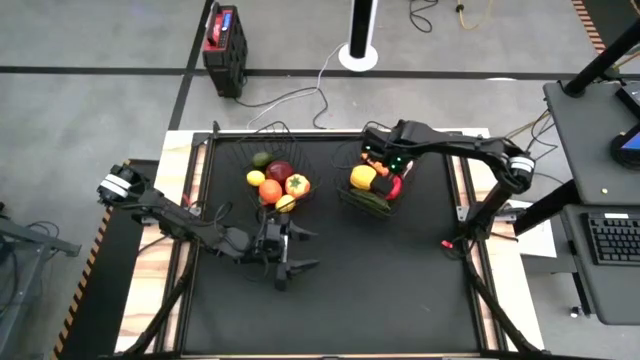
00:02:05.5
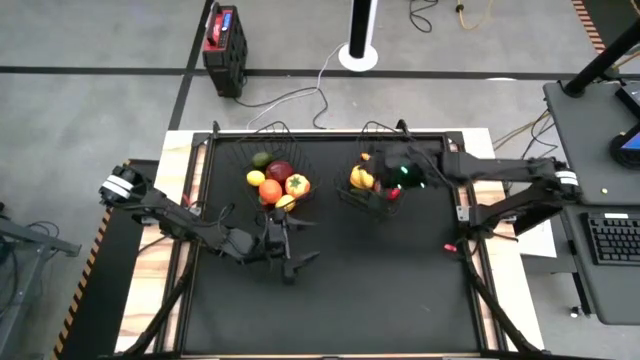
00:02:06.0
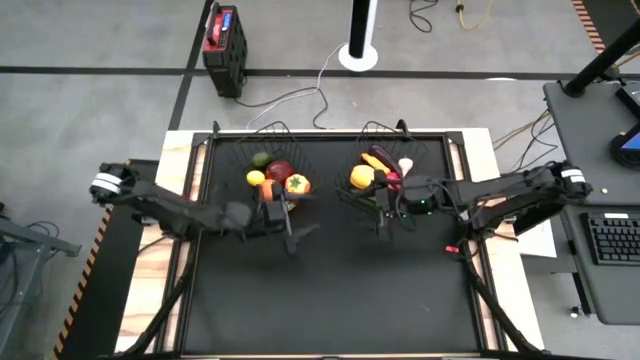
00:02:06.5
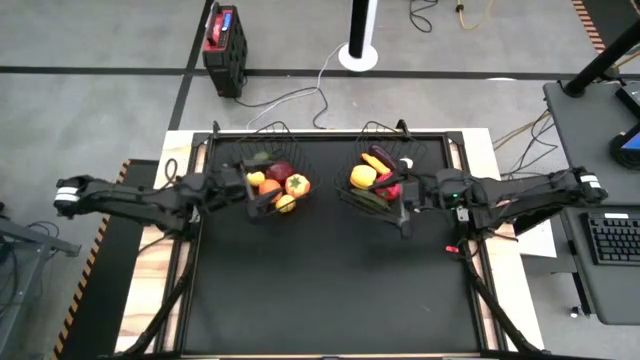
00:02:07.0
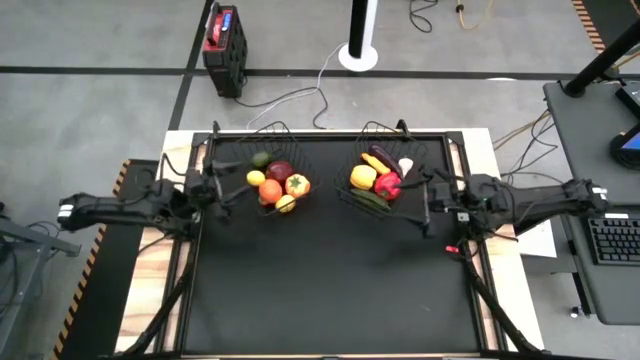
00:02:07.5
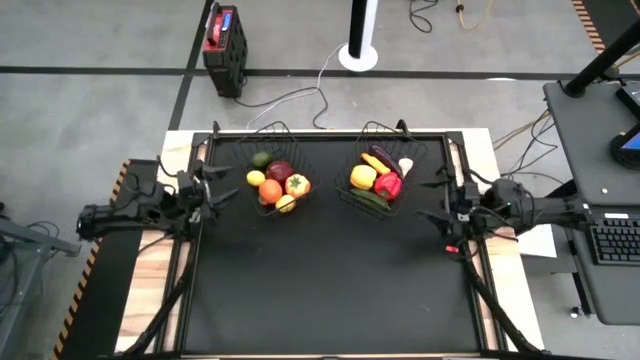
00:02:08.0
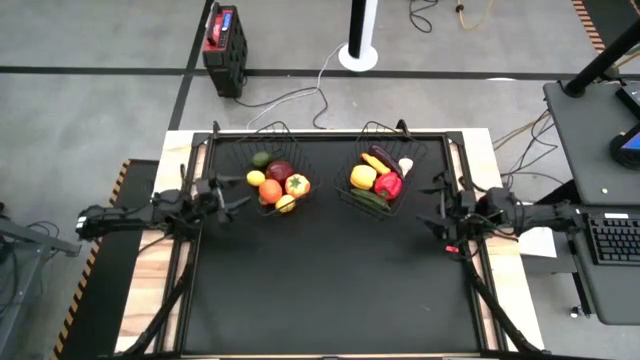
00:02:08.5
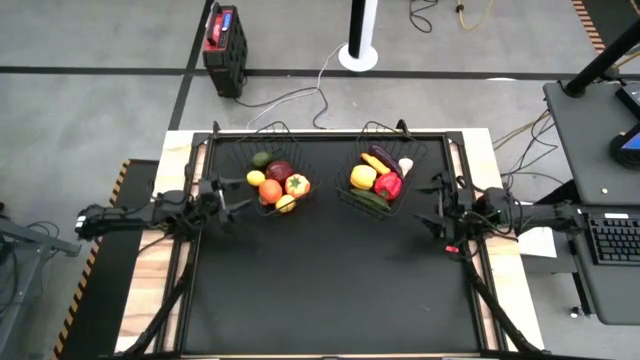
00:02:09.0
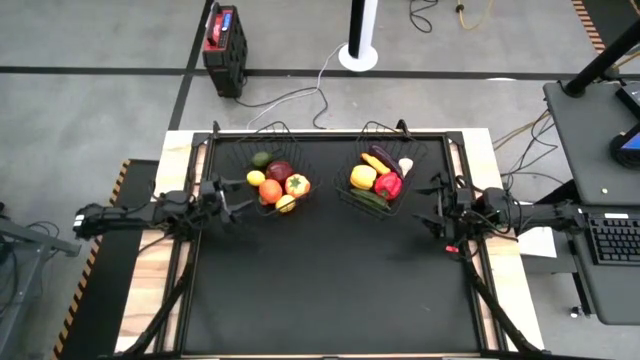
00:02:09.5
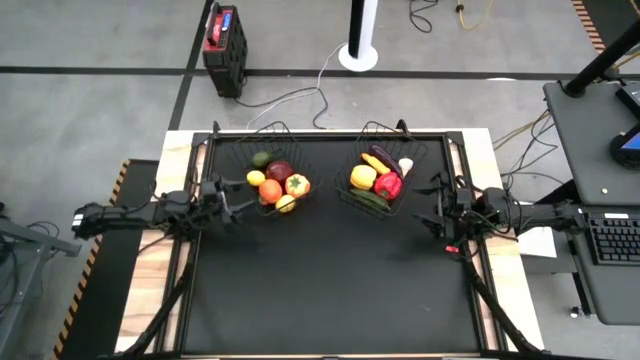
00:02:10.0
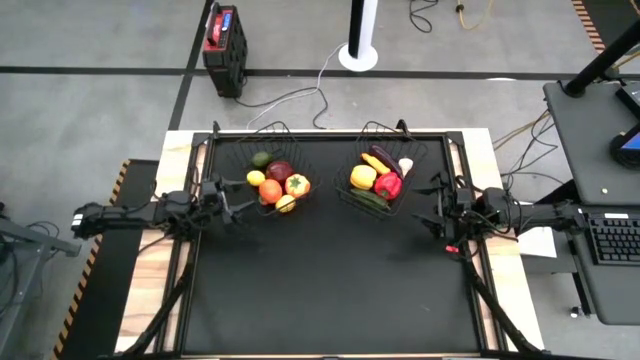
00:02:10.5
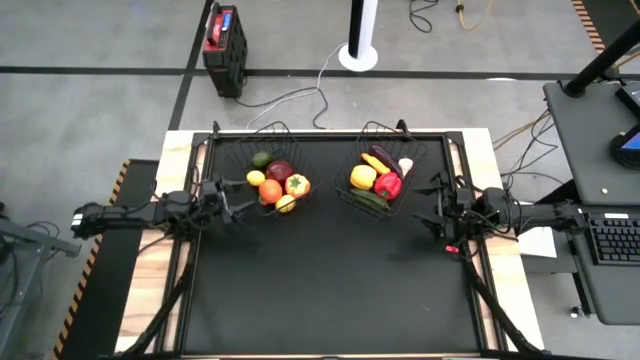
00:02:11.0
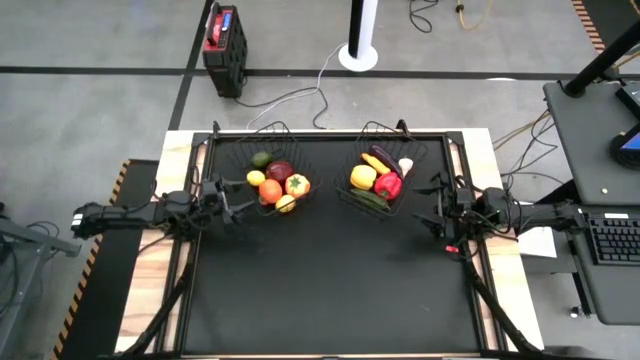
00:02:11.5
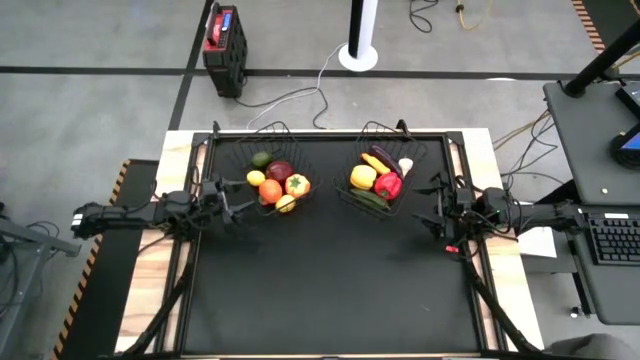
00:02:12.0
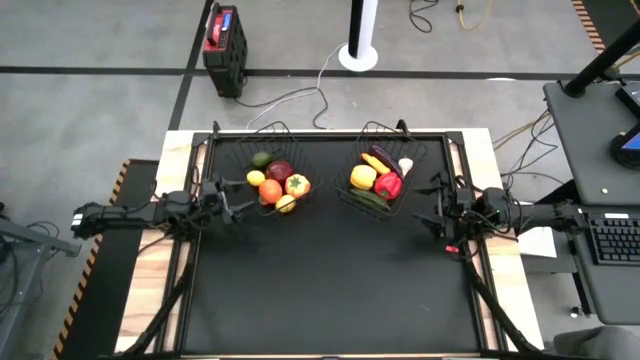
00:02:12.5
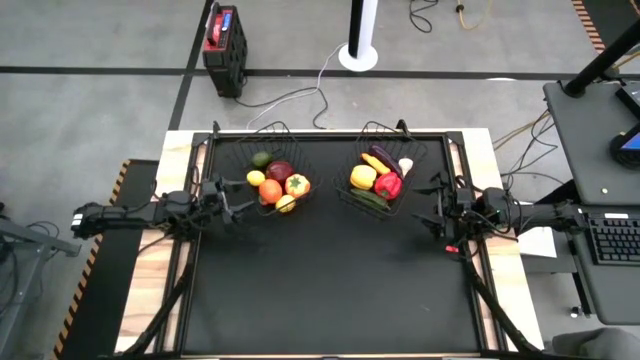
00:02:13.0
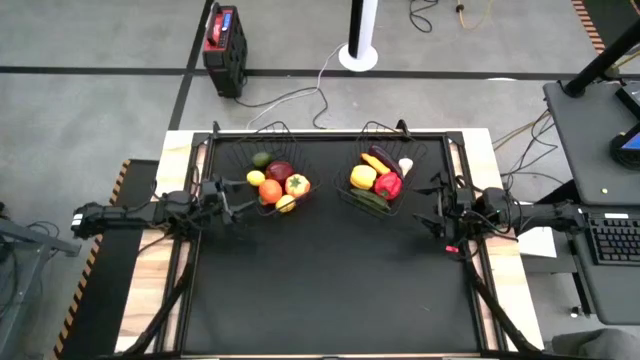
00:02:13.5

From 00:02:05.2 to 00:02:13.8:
Task: Sort produce into baskets
Return to Home Position

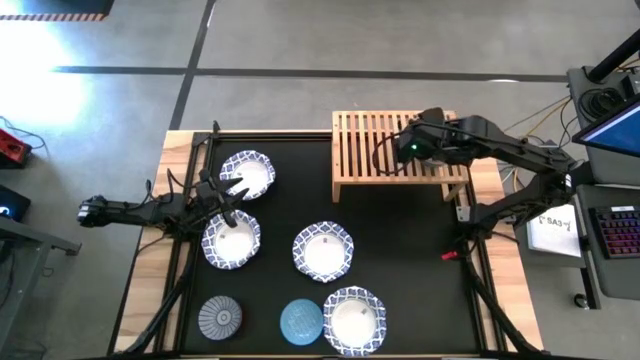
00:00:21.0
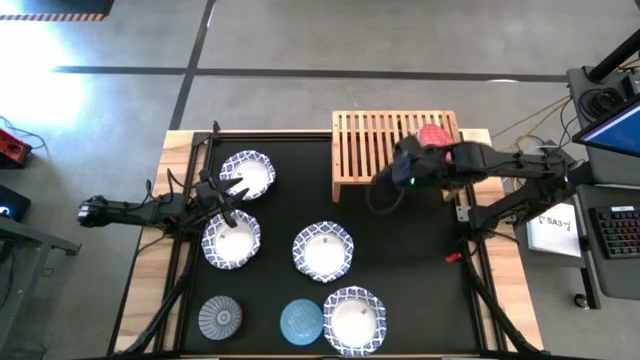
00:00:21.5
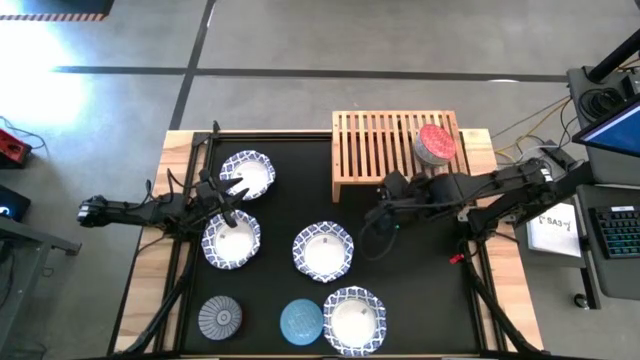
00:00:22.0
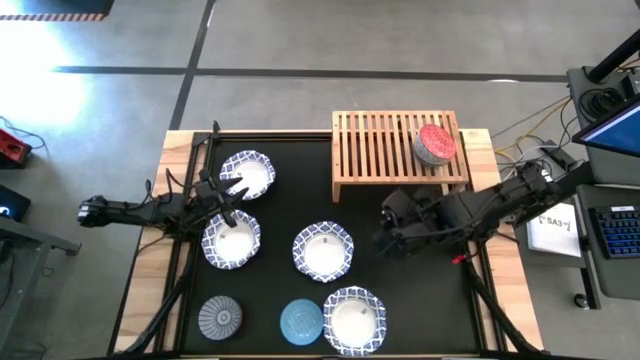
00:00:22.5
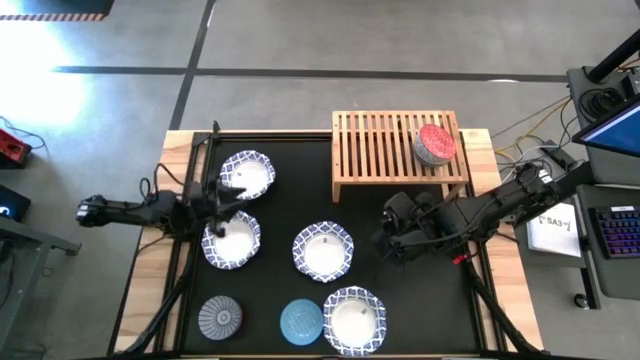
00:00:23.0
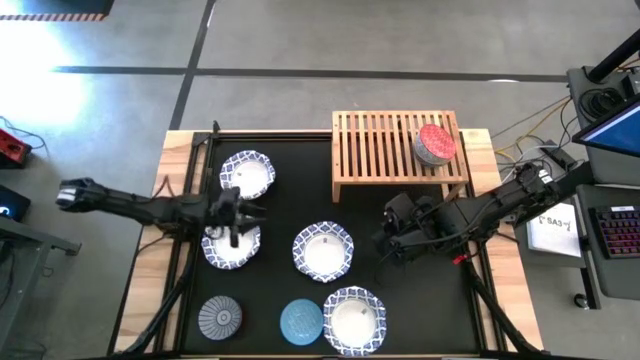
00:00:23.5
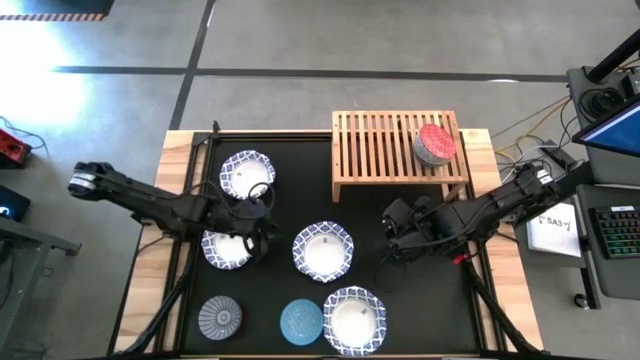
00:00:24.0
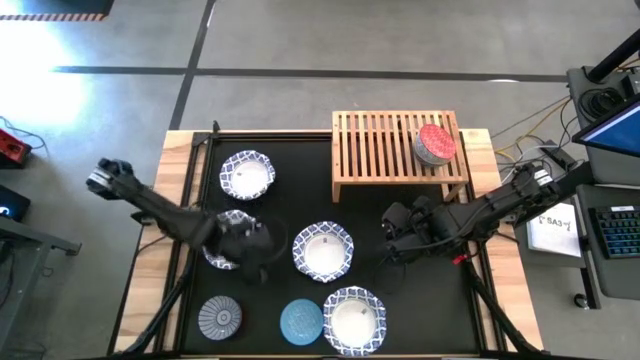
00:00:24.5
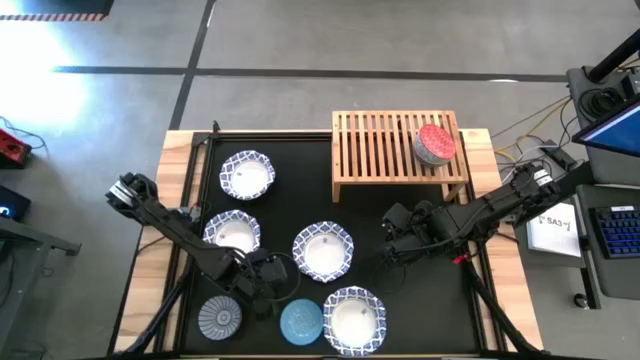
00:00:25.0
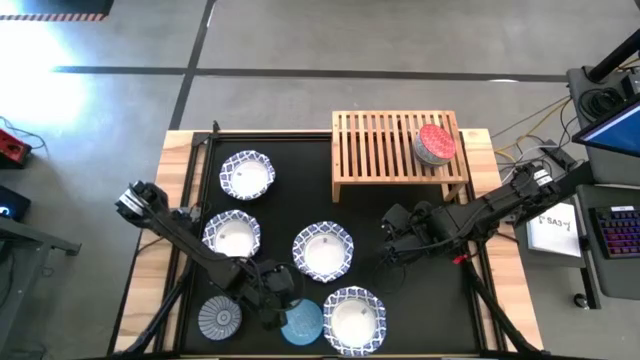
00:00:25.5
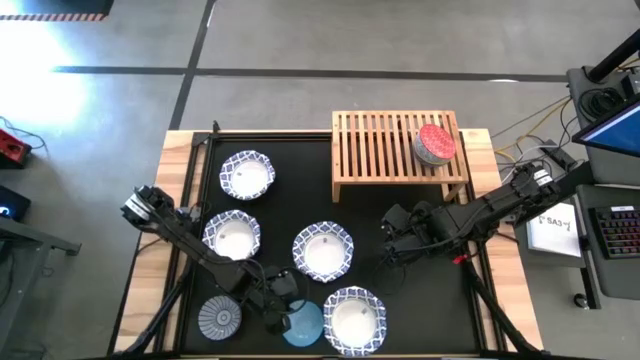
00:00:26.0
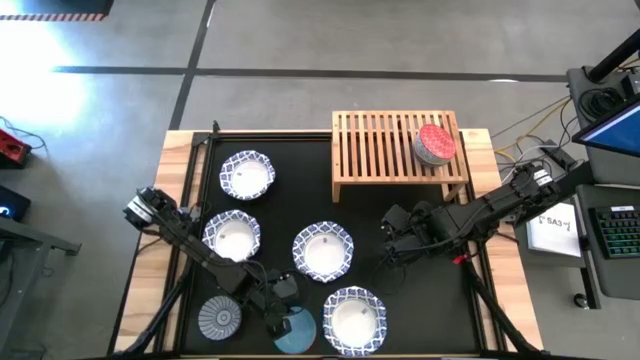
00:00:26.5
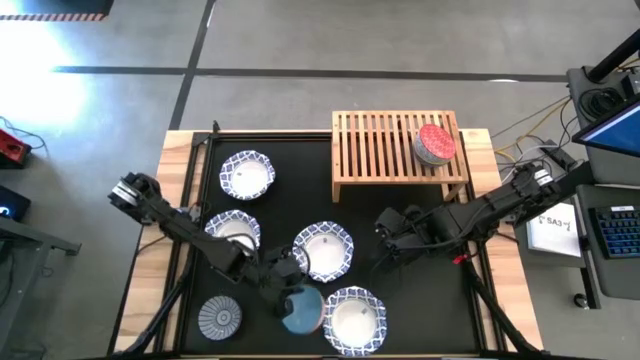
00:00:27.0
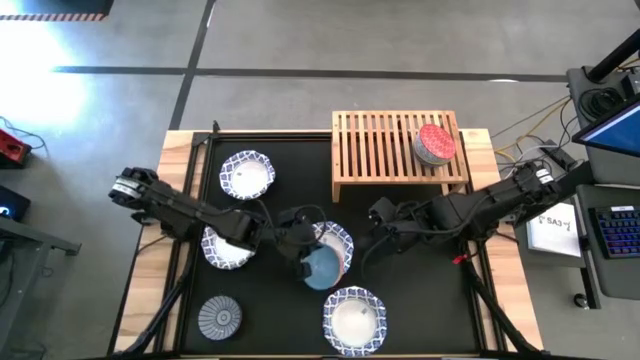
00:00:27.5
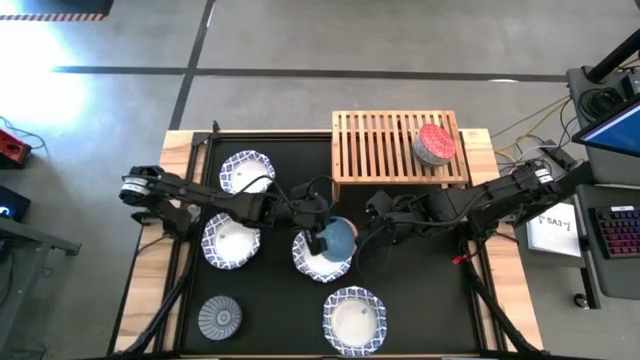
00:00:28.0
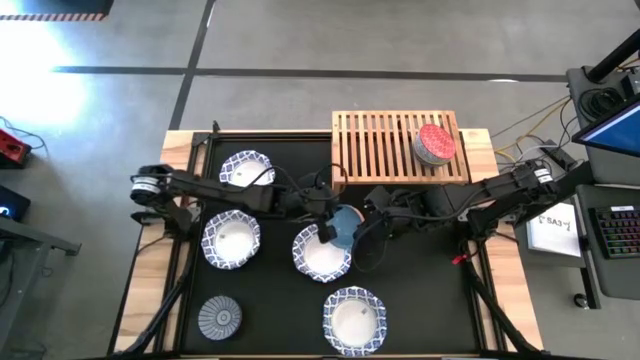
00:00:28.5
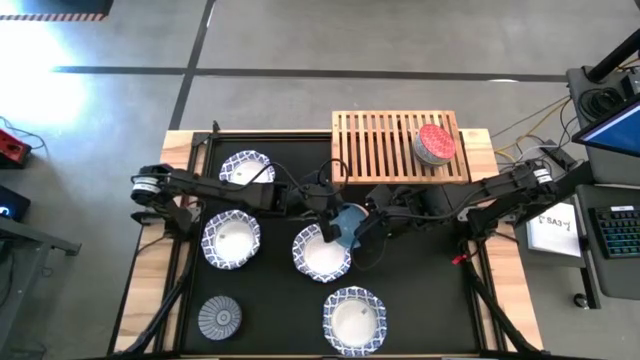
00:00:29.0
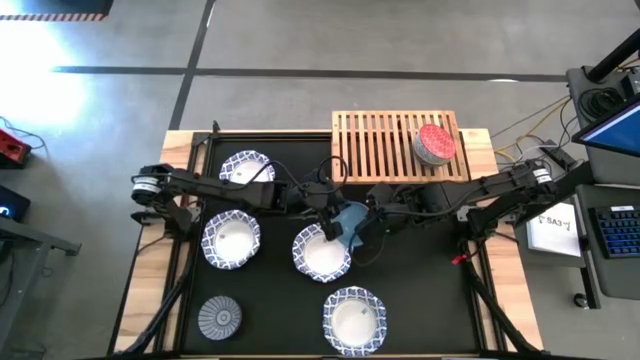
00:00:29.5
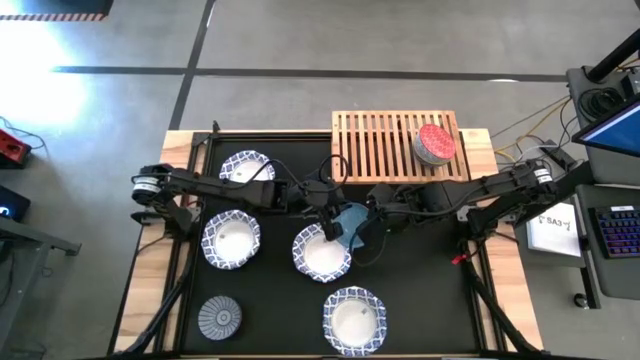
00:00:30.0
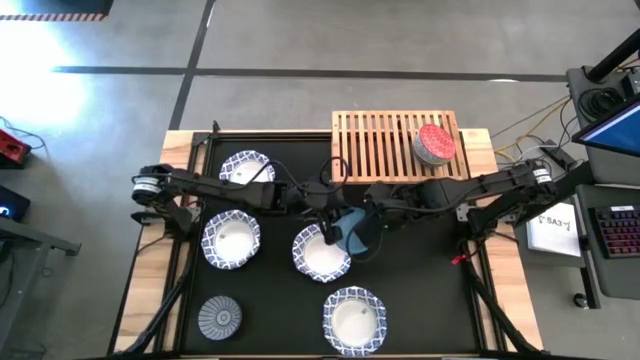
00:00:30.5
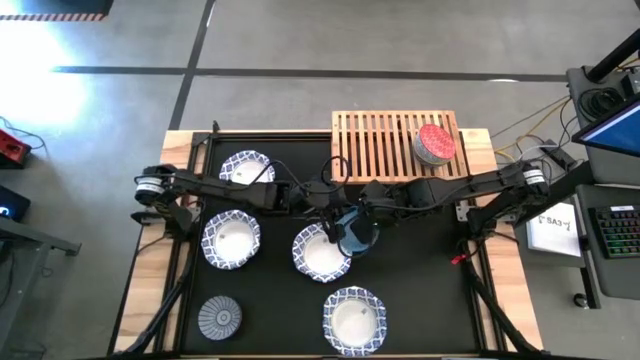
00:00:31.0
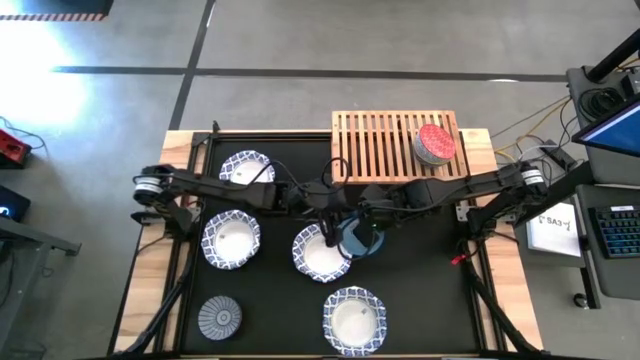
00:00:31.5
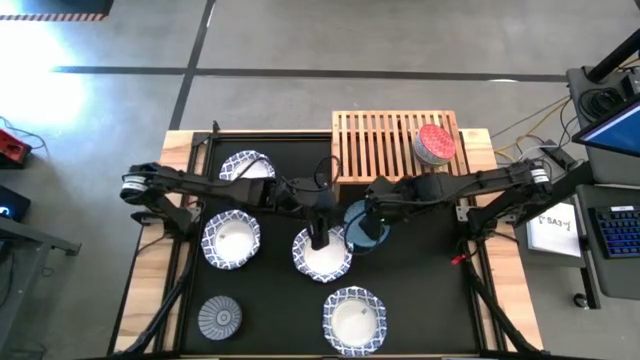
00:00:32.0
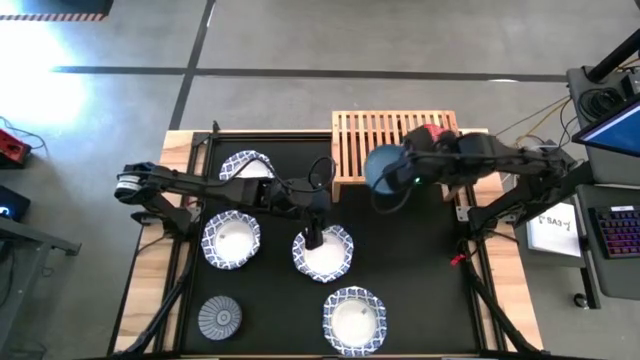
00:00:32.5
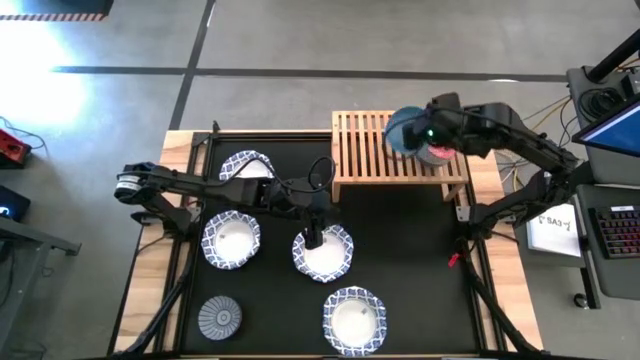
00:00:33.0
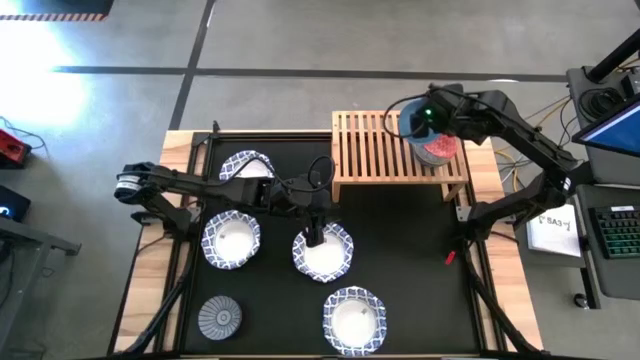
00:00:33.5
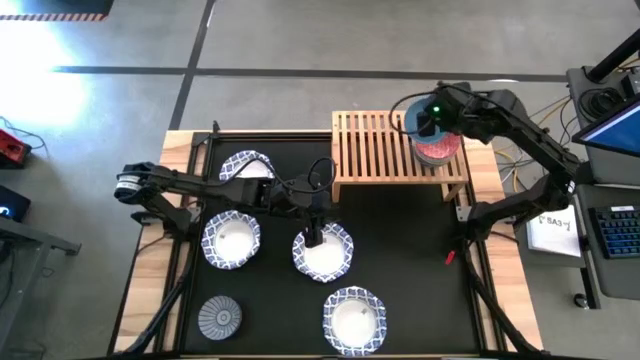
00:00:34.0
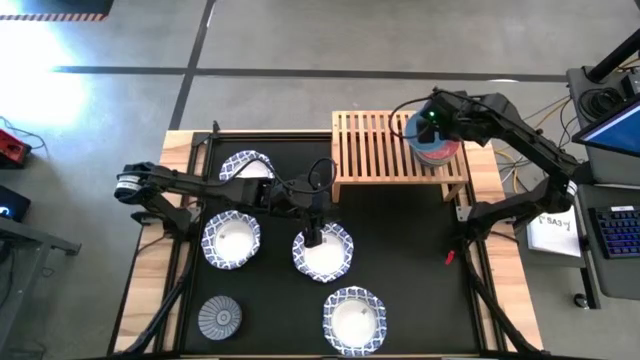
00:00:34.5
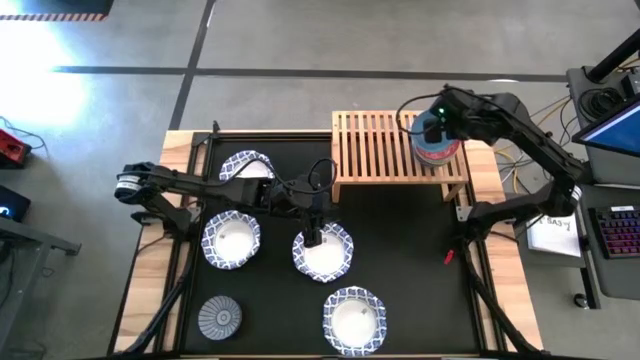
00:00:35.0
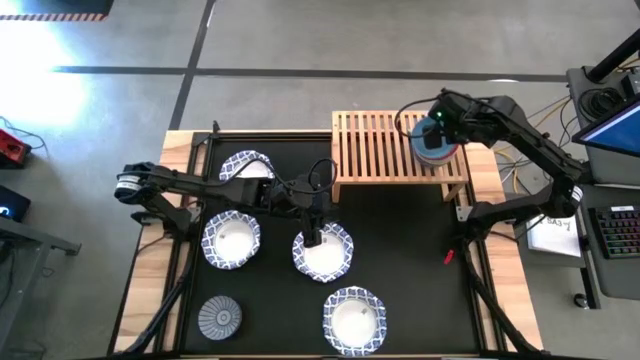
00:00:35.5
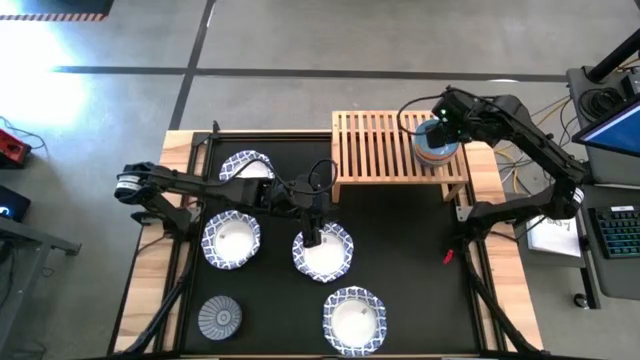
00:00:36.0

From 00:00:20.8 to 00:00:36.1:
Task: Place and stack bowls onto a shelf
Stack the light blue bowl on top of the red bowl on the shelf
